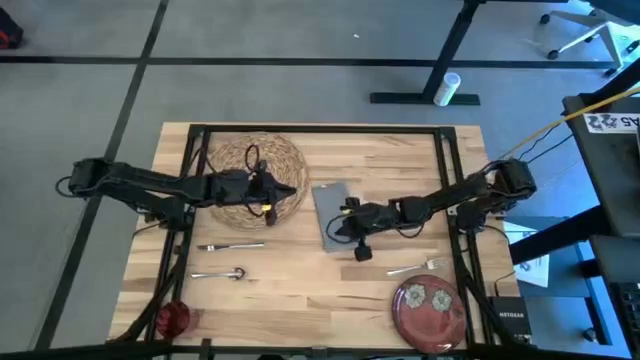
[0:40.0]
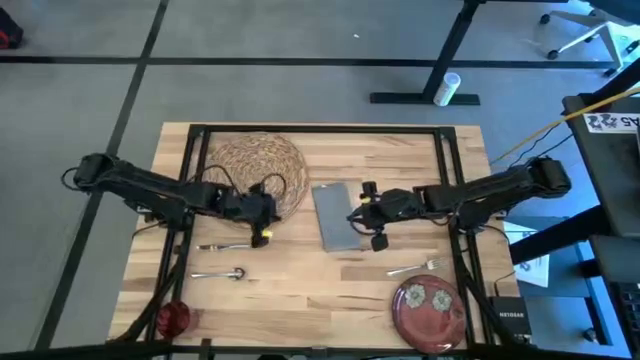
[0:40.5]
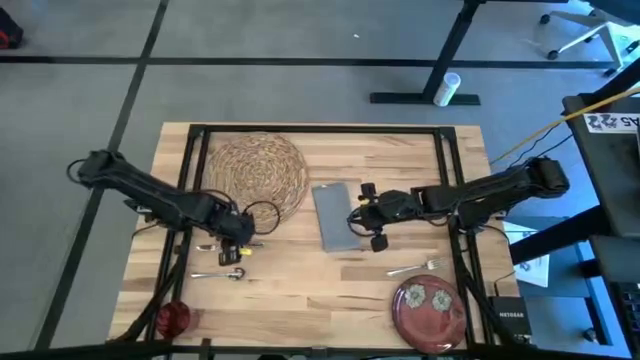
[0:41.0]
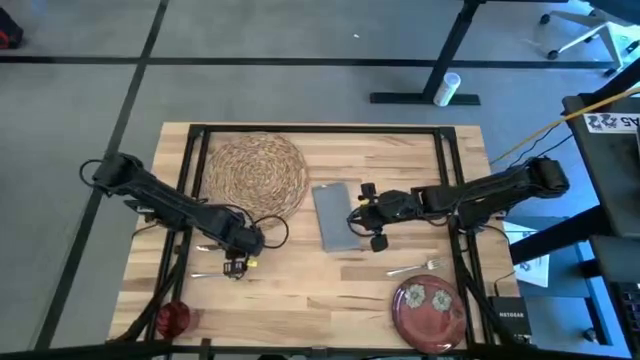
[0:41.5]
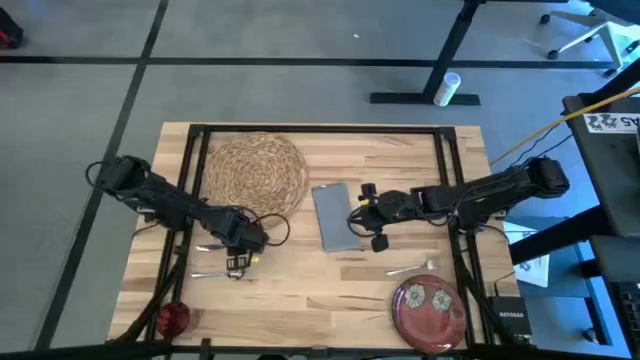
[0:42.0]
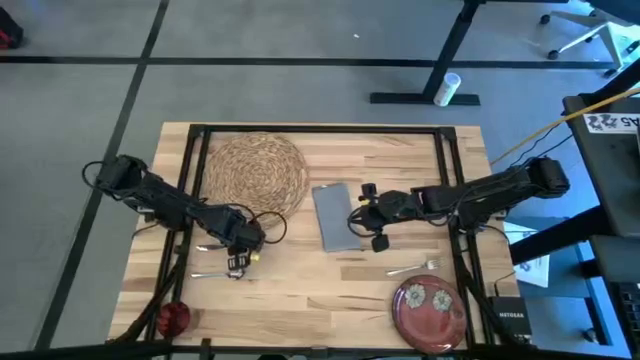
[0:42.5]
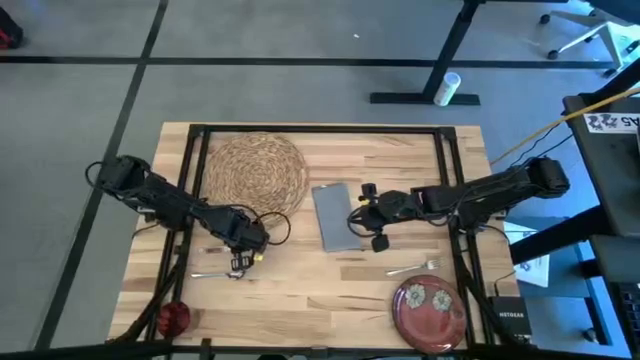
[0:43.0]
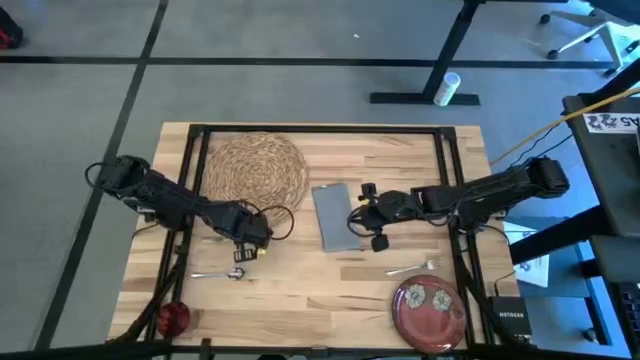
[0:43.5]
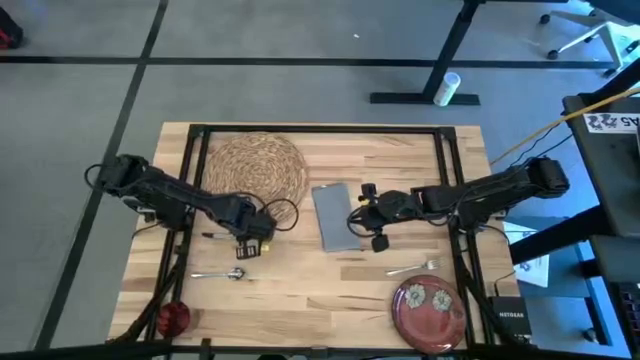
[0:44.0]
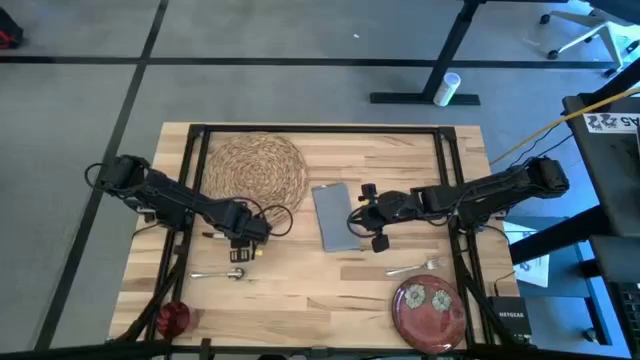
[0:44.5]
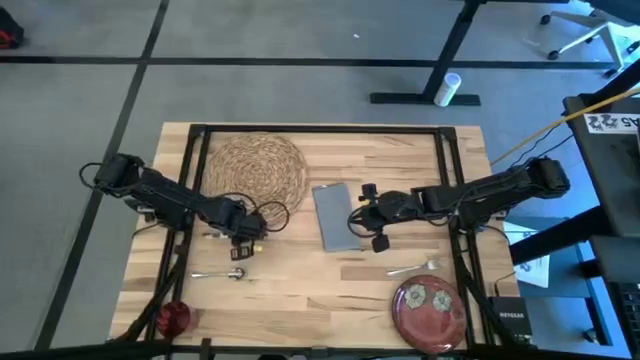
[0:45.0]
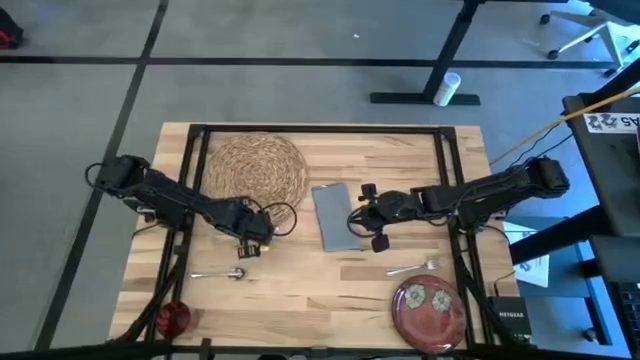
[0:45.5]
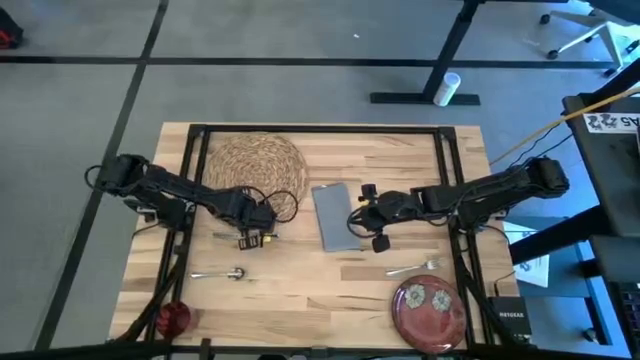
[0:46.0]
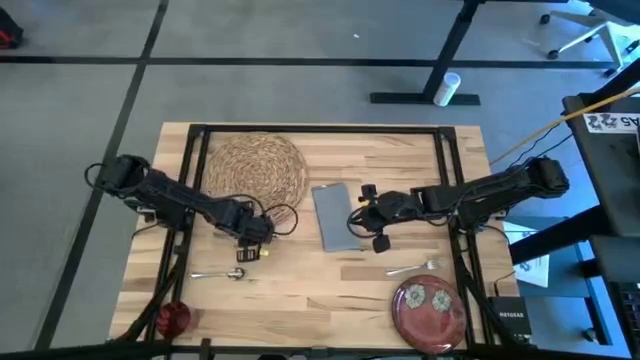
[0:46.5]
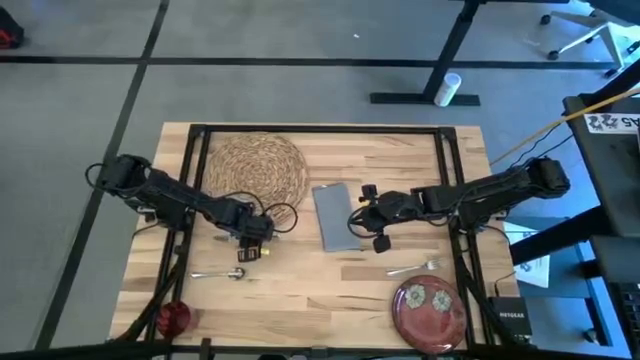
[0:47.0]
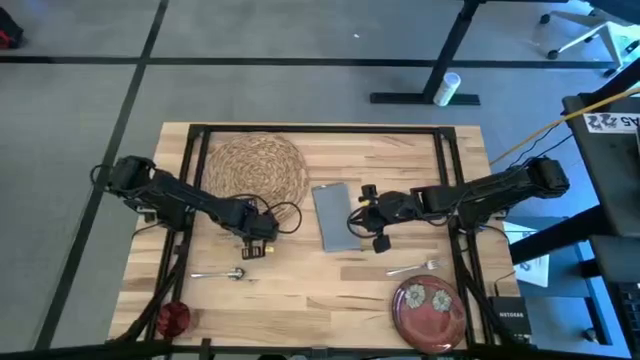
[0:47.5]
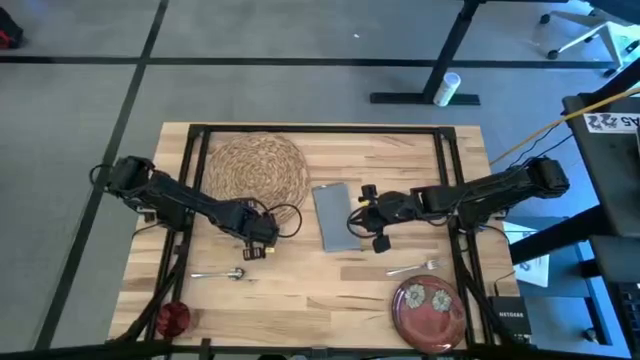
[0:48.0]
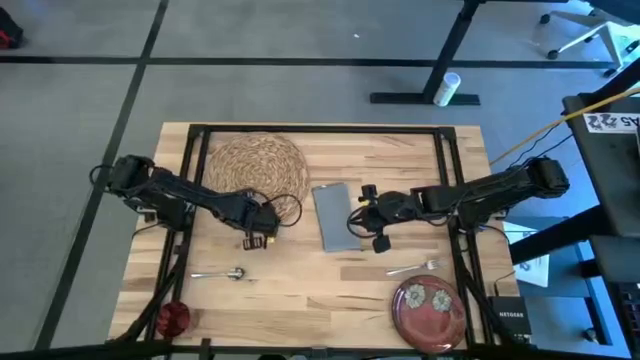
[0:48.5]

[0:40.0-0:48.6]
Task: Set table place
Put the silver table knife on the brown placemat

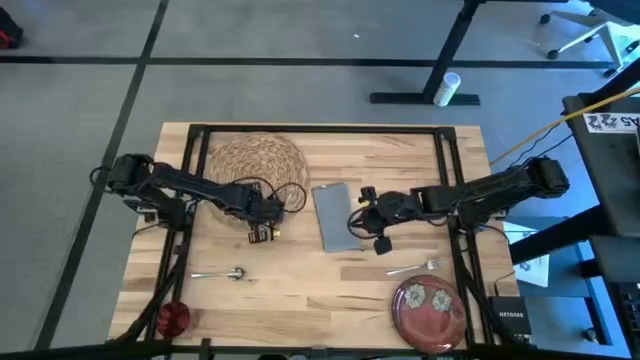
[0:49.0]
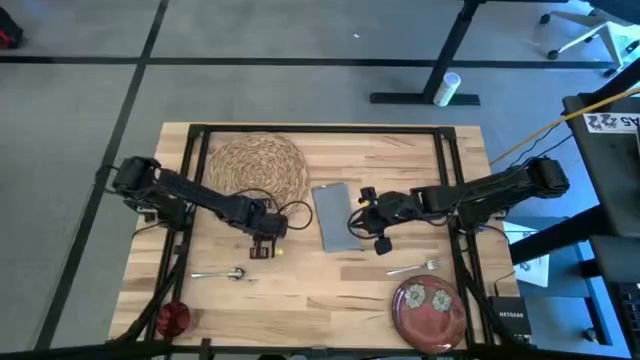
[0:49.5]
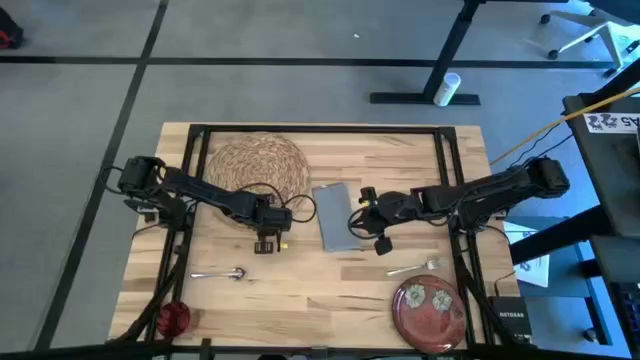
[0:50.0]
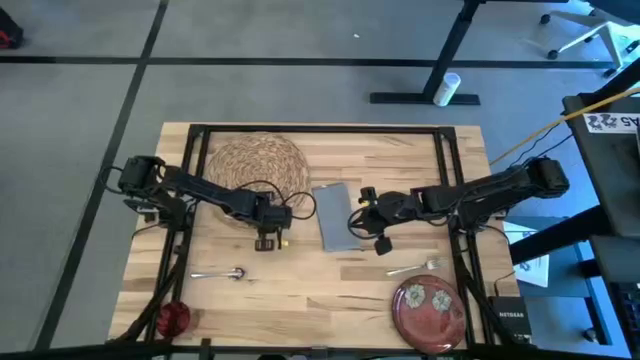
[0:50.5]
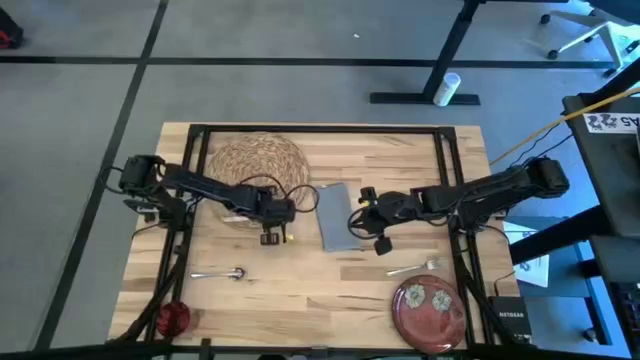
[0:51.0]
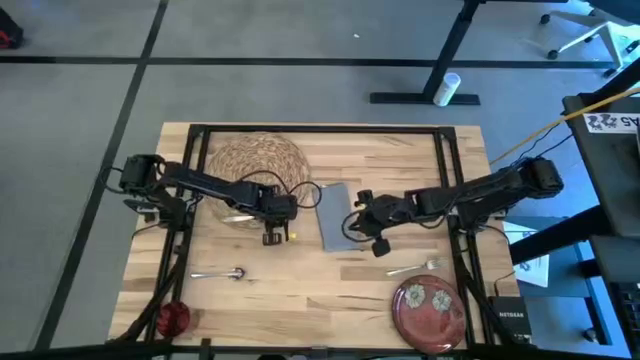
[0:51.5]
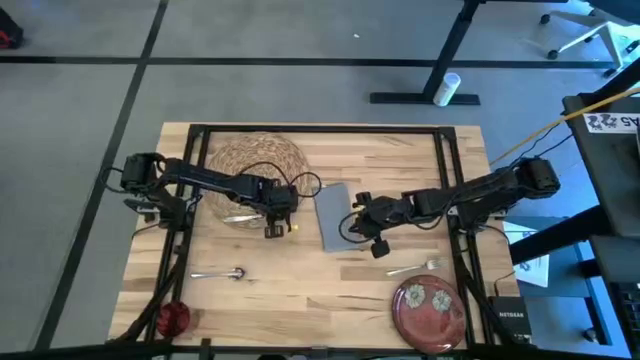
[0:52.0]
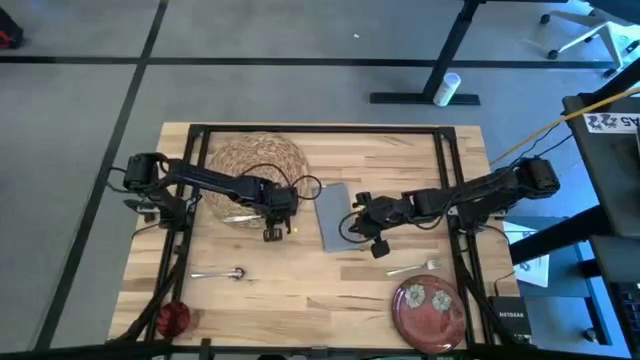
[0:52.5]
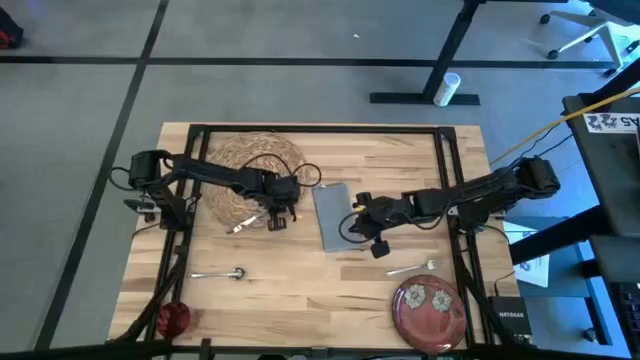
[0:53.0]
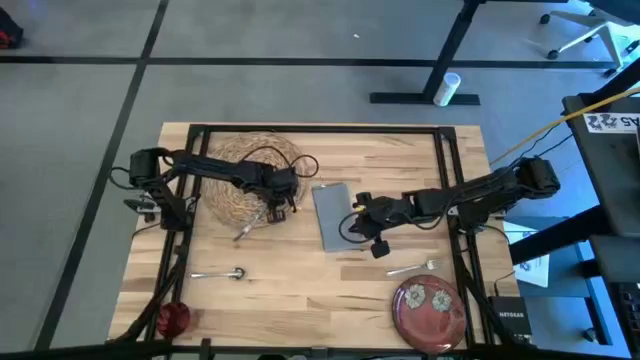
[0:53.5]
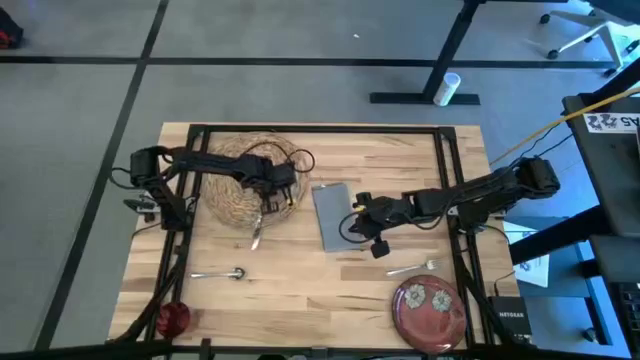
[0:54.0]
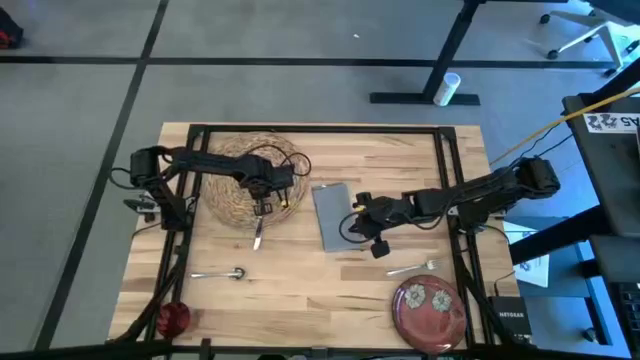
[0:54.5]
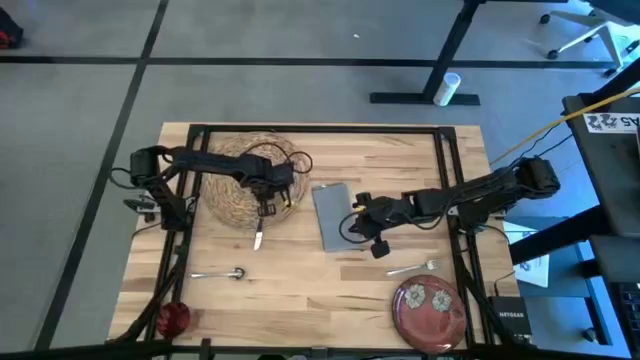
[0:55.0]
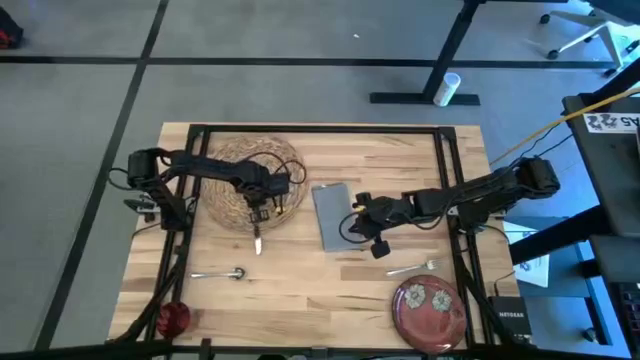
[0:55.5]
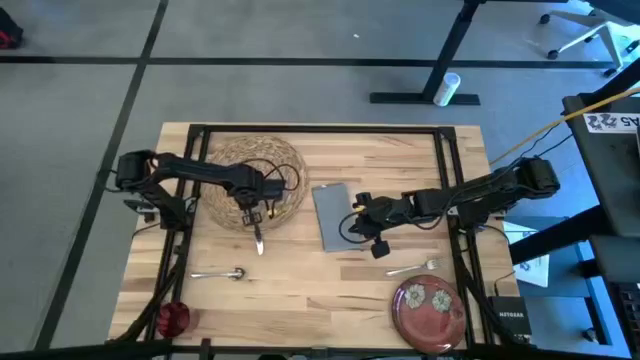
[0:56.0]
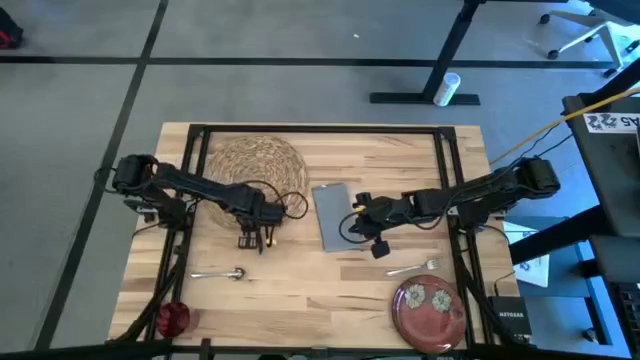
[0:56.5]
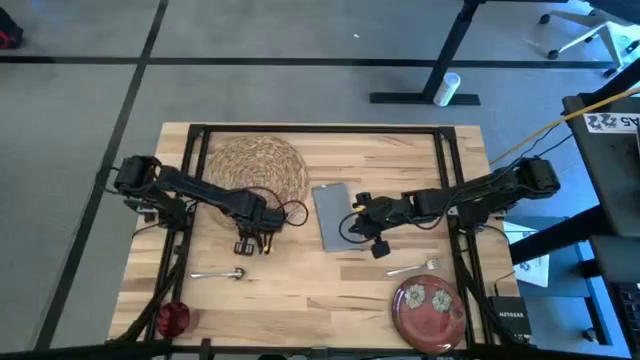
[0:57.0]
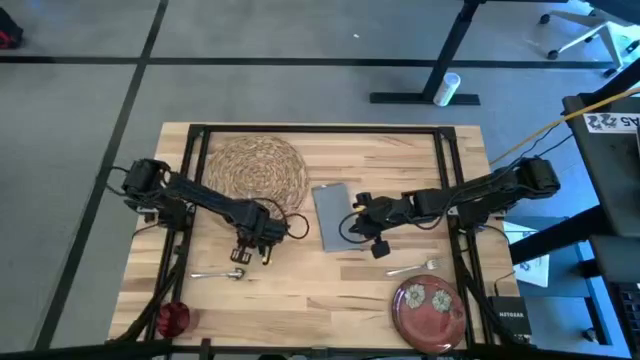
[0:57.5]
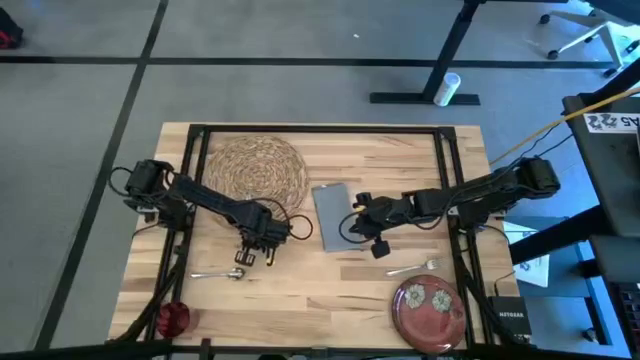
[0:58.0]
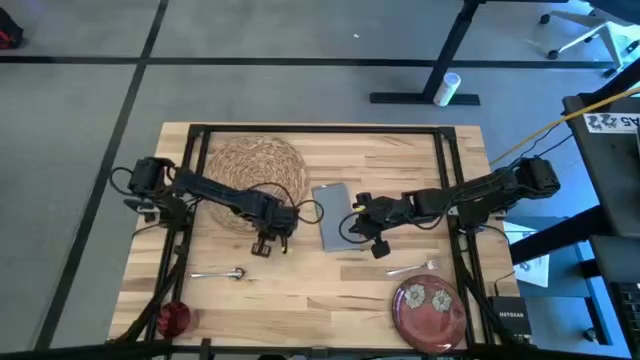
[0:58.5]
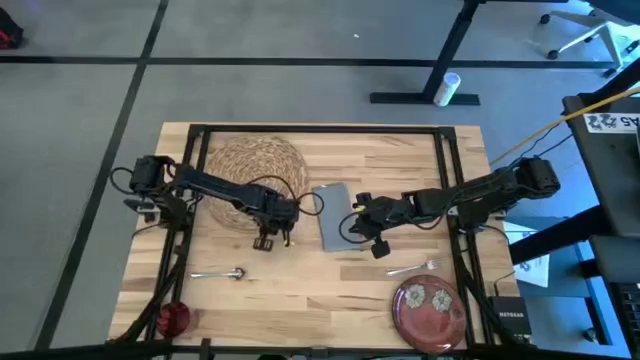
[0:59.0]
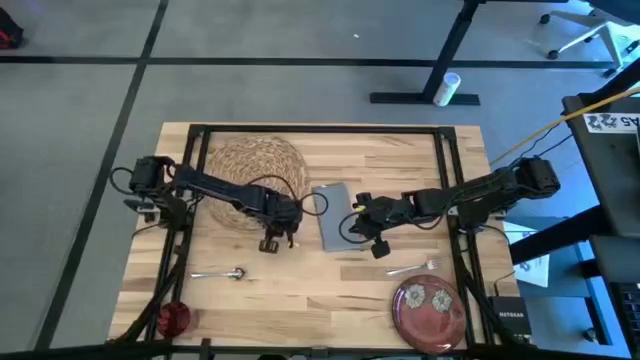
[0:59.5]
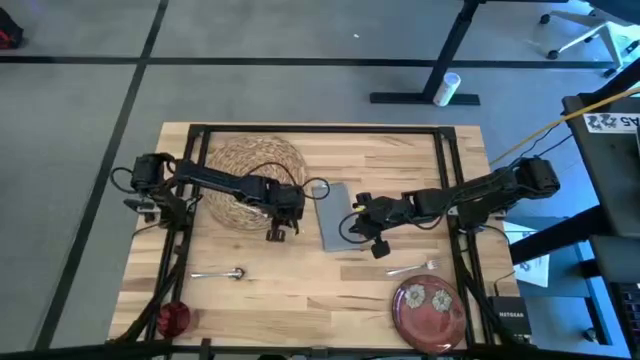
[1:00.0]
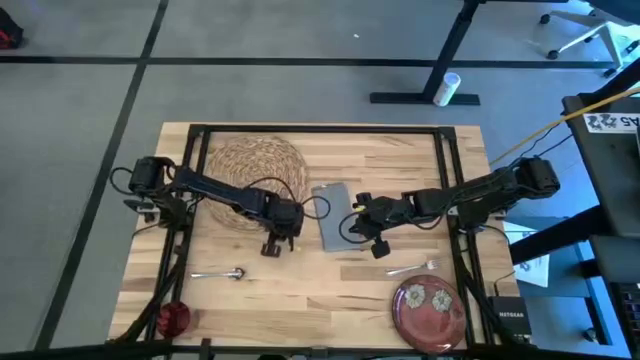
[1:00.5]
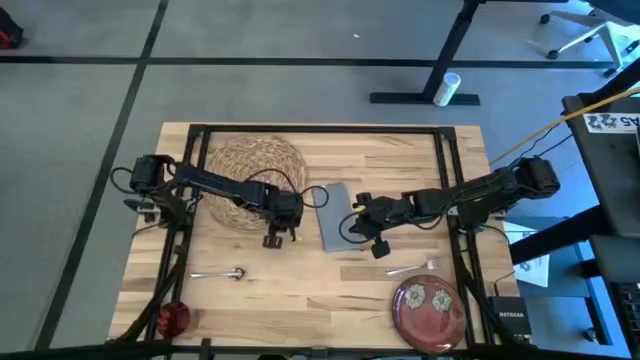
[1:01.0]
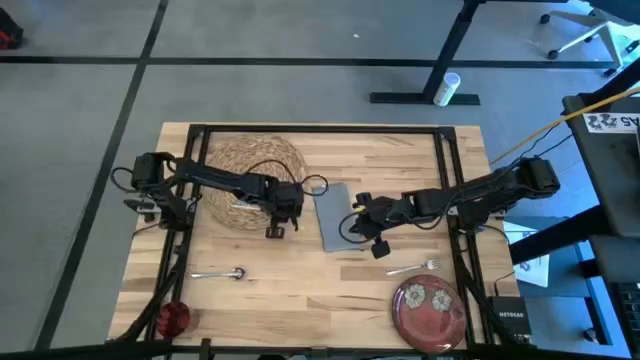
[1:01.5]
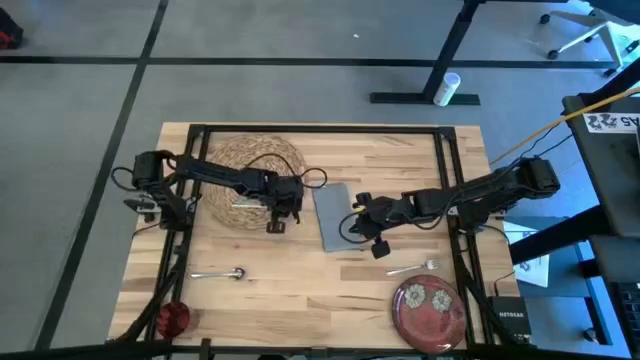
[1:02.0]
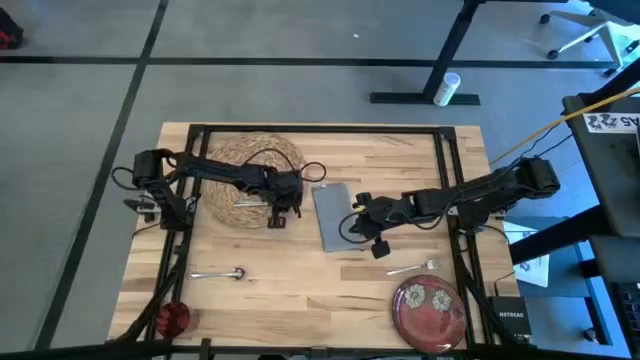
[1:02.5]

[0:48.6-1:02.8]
Put the silver table knife on the brown placemat
